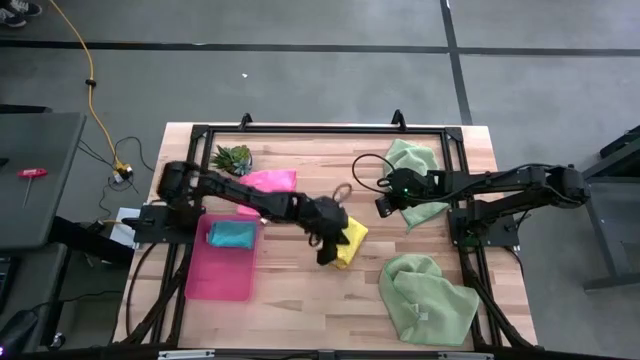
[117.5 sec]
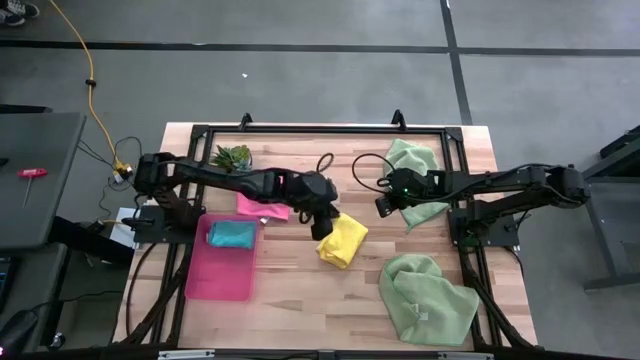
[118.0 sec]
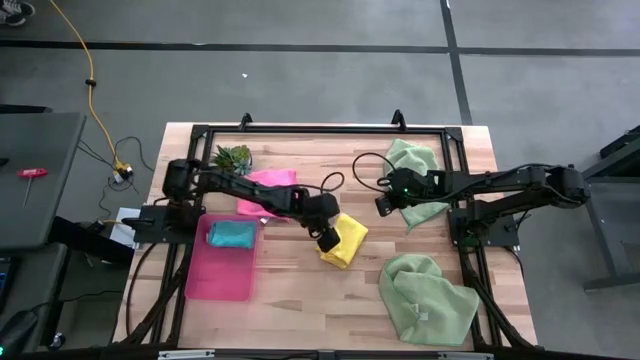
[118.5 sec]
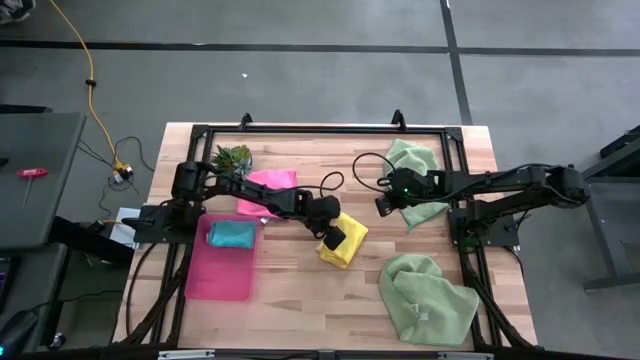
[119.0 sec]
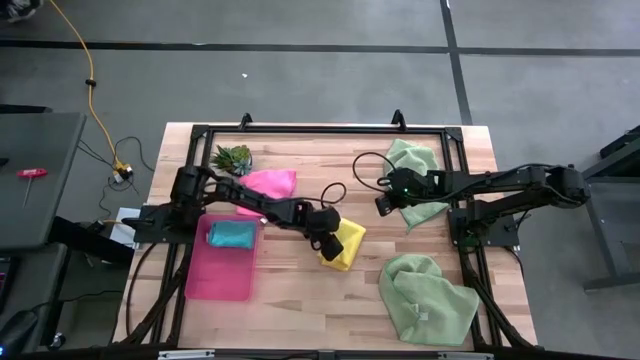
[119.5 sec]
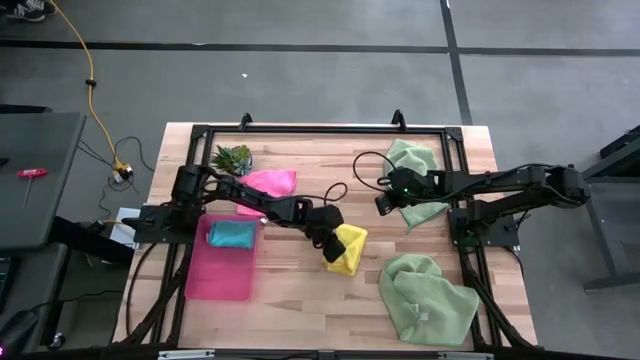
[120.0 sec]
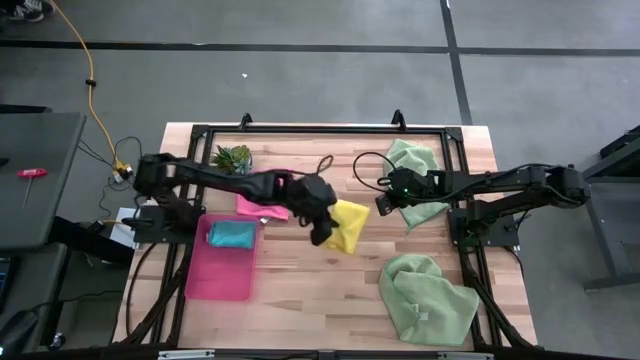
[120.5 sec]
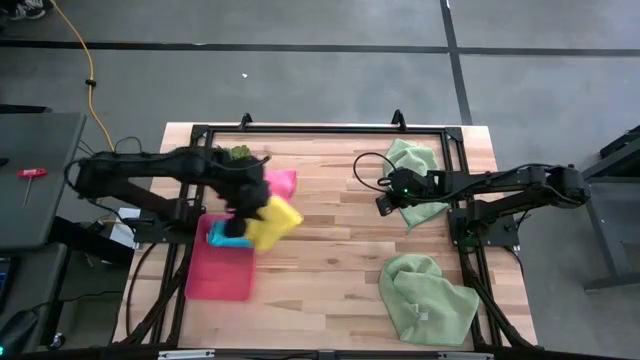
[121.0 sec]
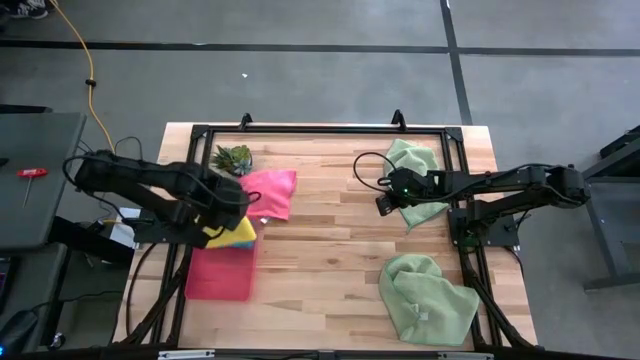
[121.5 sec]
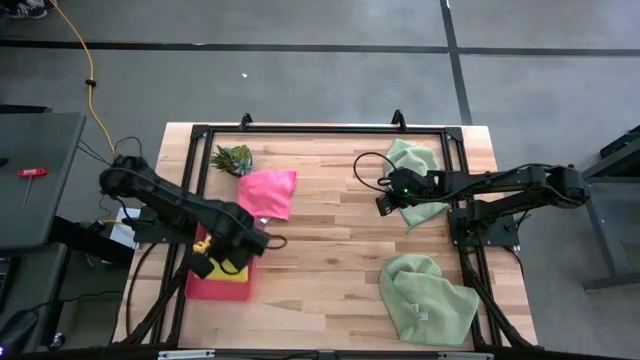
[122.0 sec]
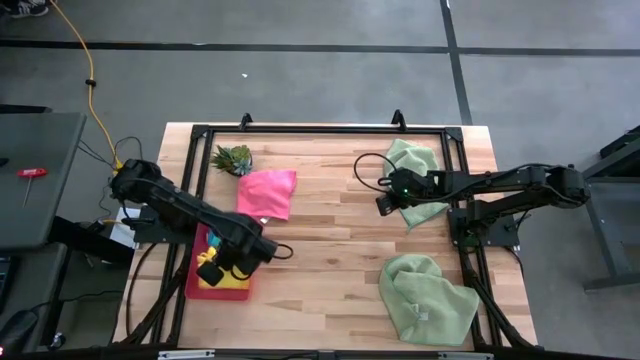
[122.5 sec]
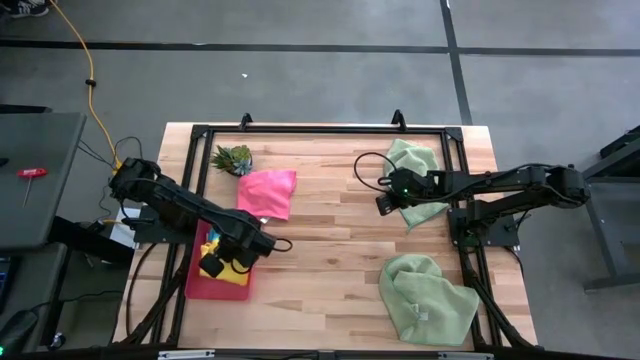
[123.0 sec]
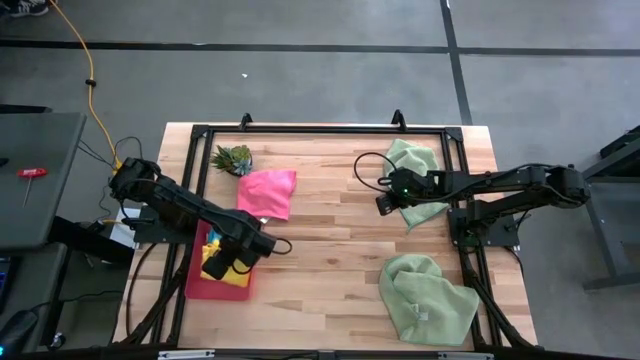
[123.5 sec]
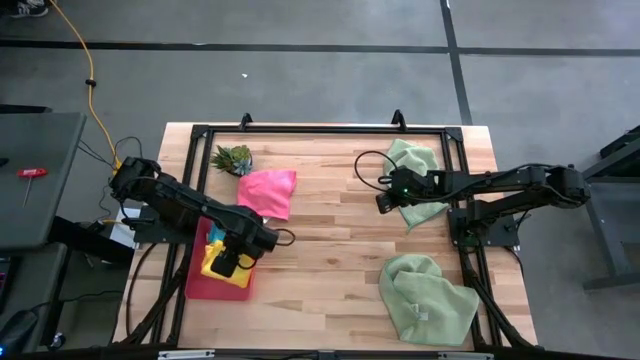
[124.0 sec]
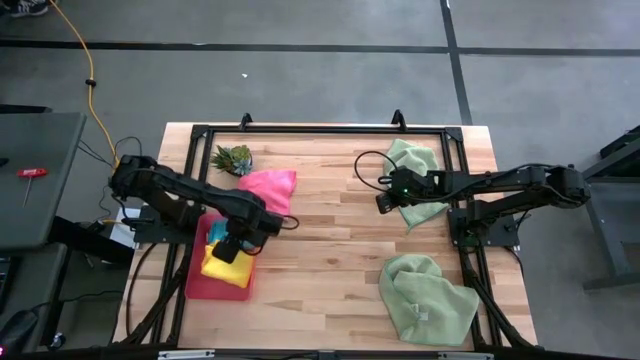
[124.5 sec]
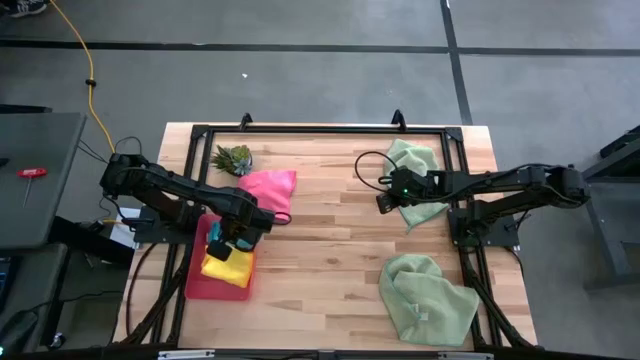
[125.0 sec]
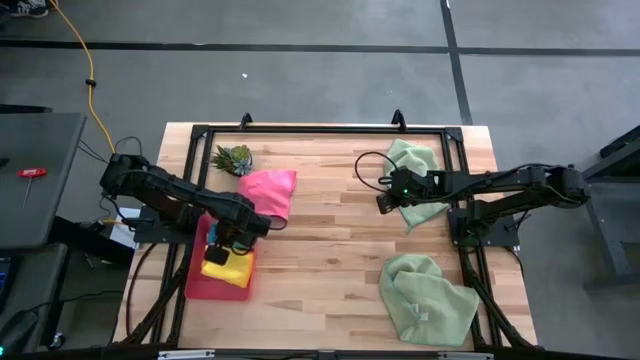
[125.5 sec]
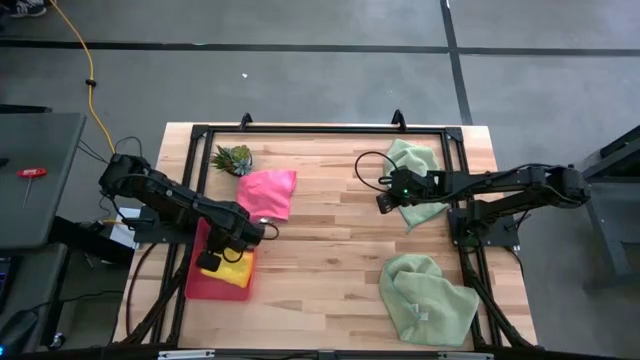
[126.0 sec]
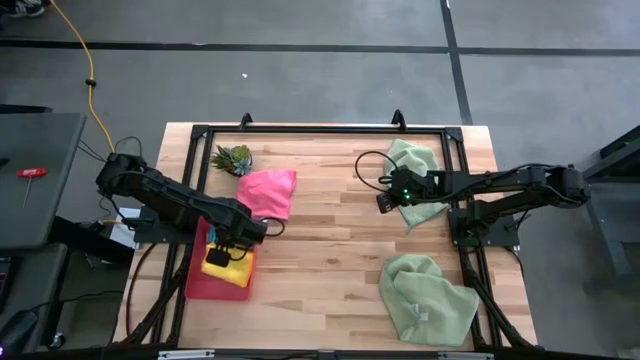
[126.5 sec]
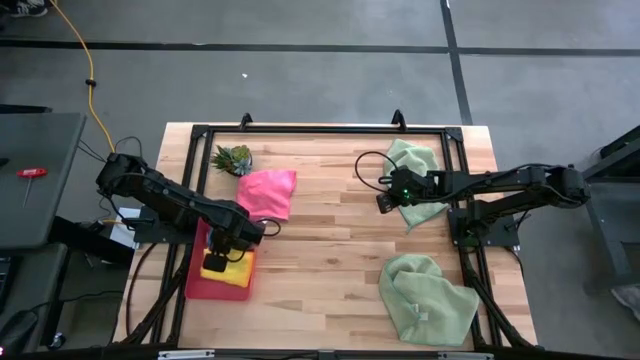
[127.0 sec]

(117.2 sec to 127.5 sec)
Task: Fold microfiber towels
Put the yellow microfiber towel into the red bin
